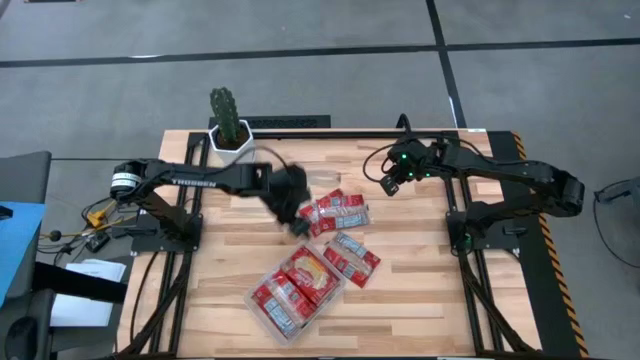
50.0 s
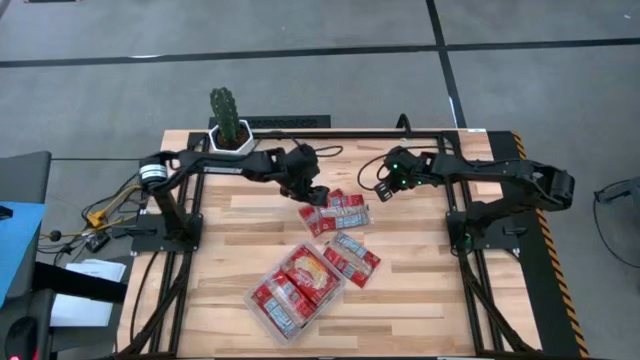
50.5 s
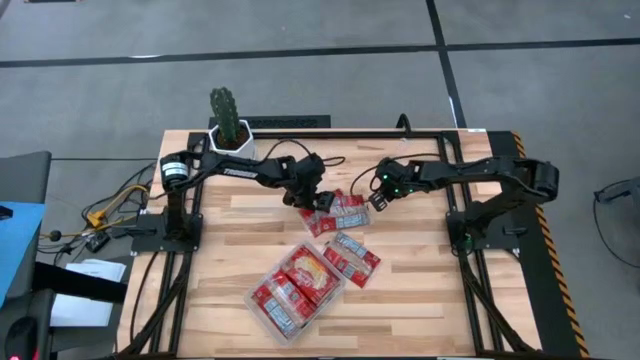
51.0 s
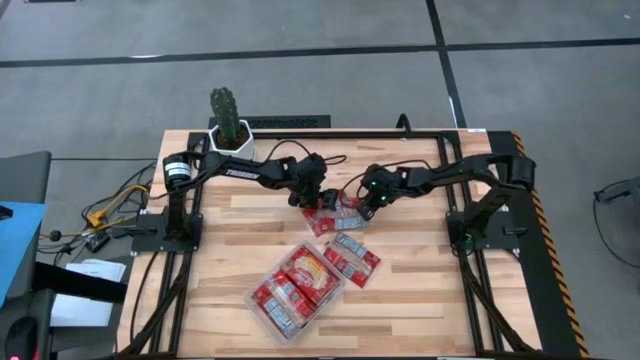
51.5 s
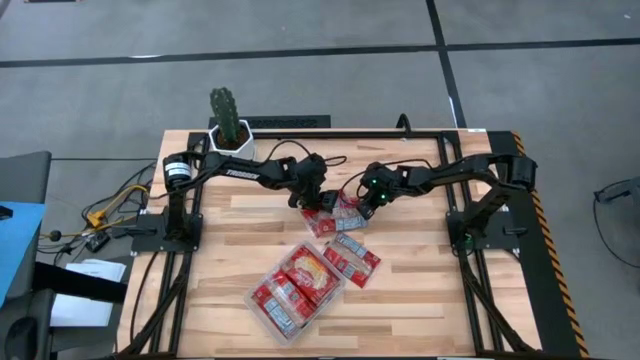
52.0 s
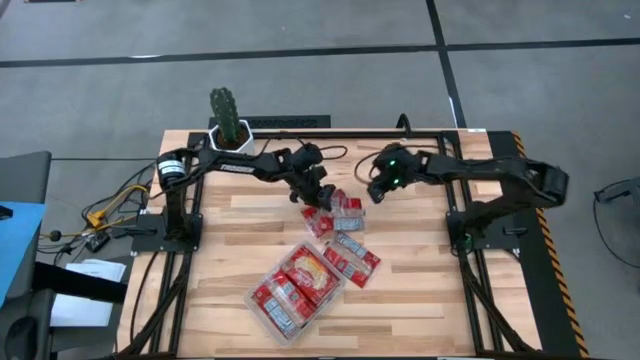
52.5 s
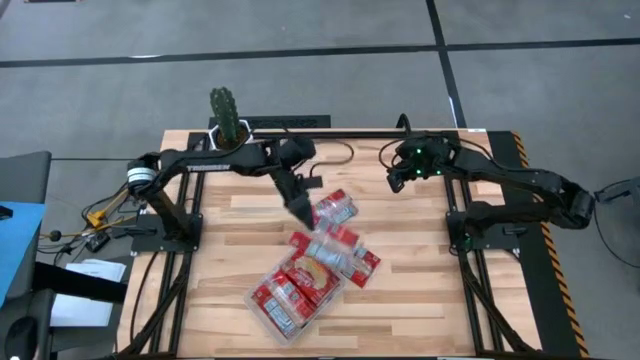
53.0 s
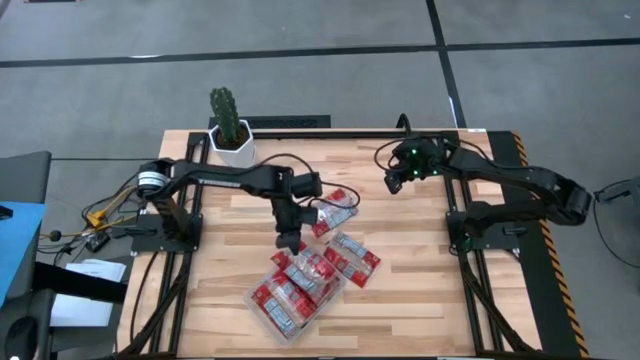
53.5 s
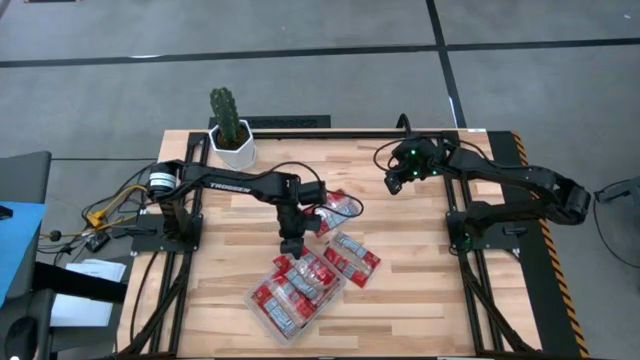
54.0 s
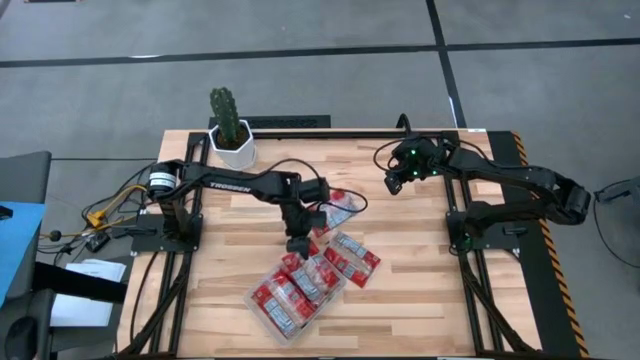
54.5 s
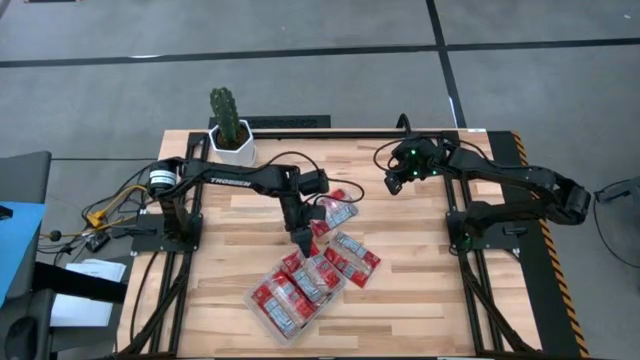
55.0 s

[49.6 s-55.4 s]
Task: Sort popcorn bags into baskets
Put the red popcorn bag into the transparent bin

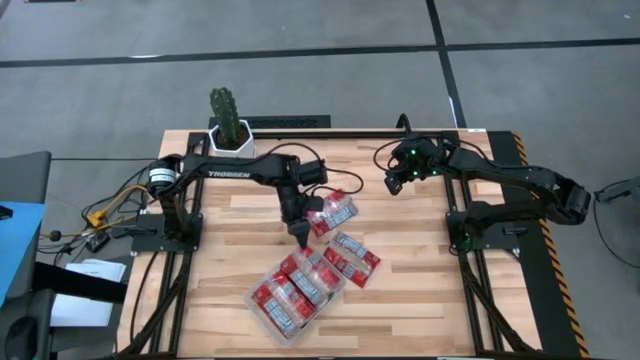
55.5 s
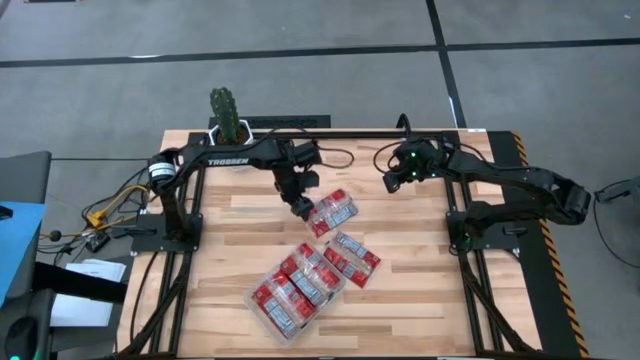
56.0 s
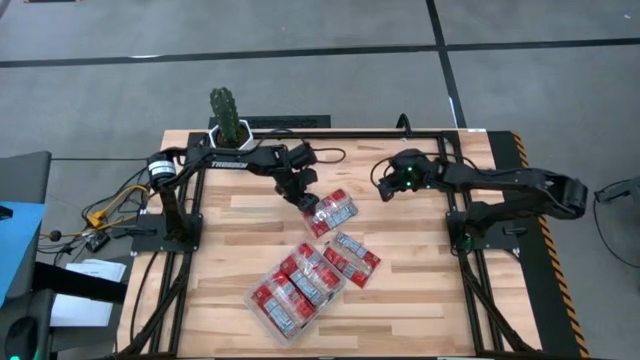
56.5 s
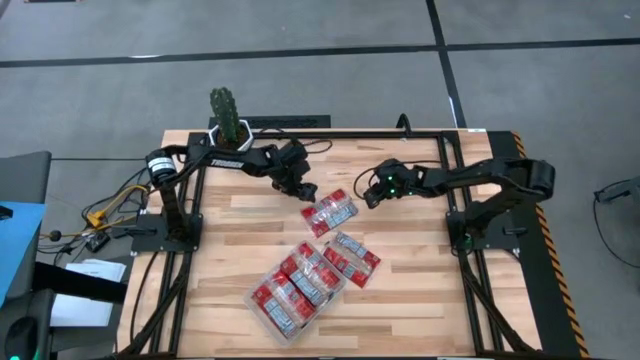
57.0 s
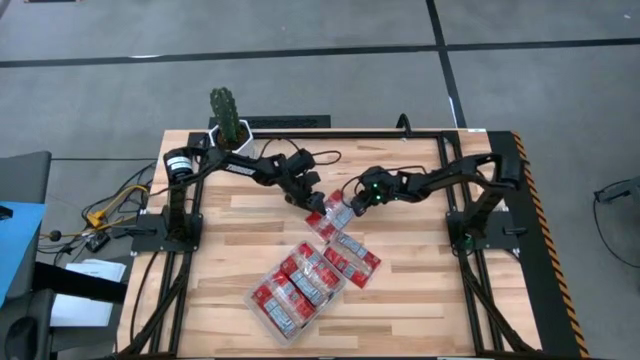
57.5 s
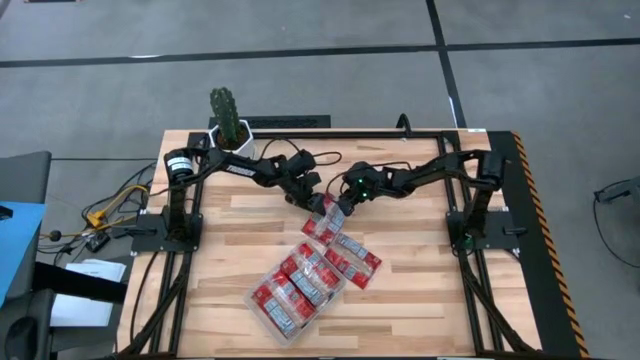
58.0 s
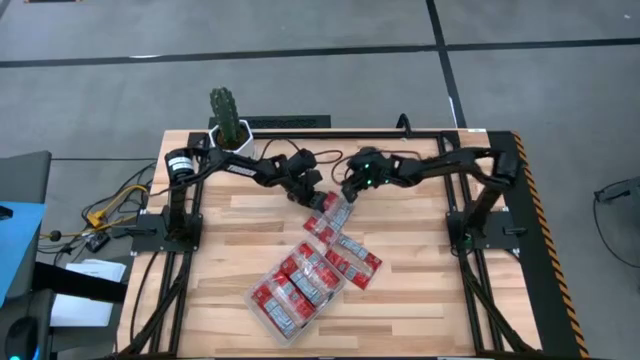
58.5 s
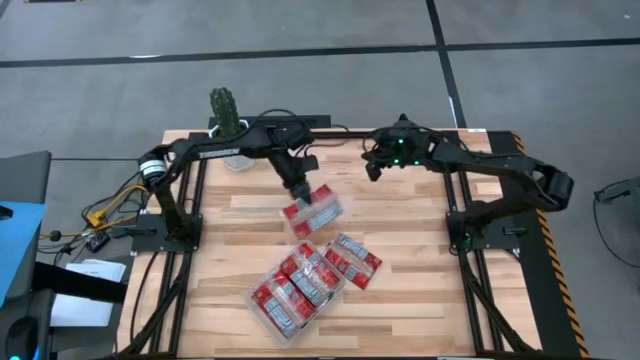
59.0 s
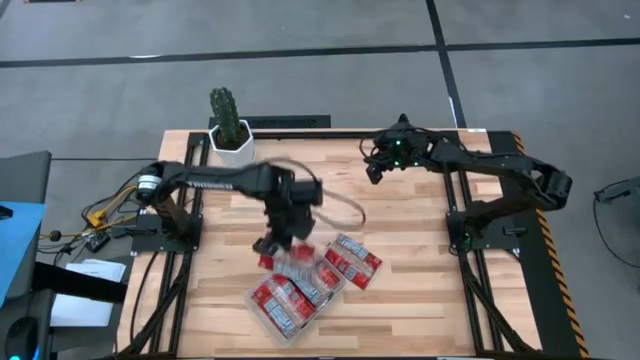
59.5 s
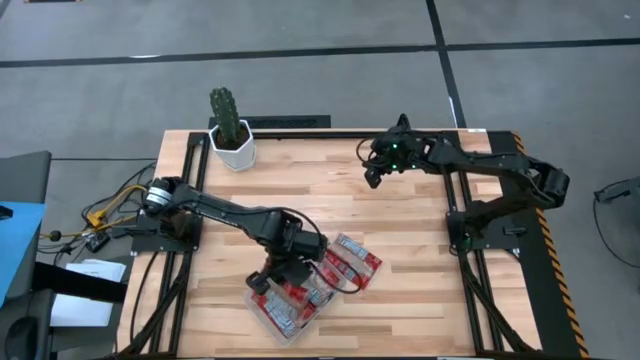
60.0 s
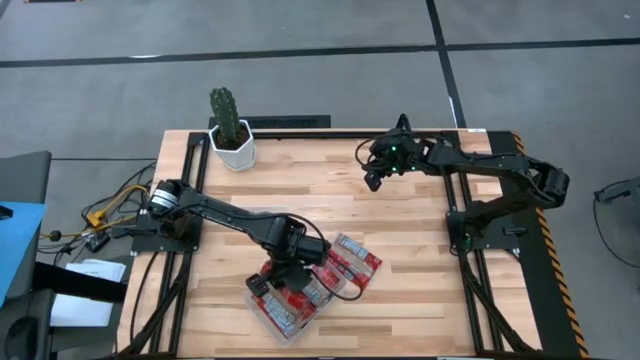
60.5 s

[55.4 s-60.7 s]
Put the red popcorn bag into the transparent bin

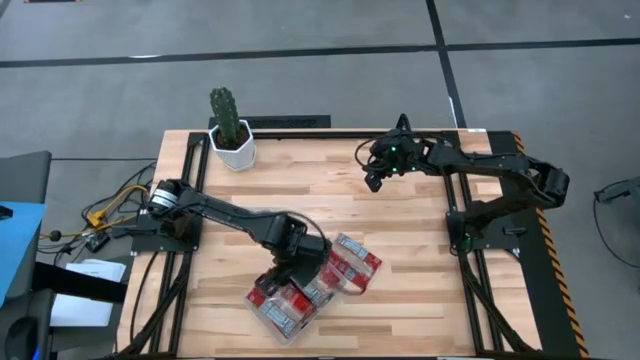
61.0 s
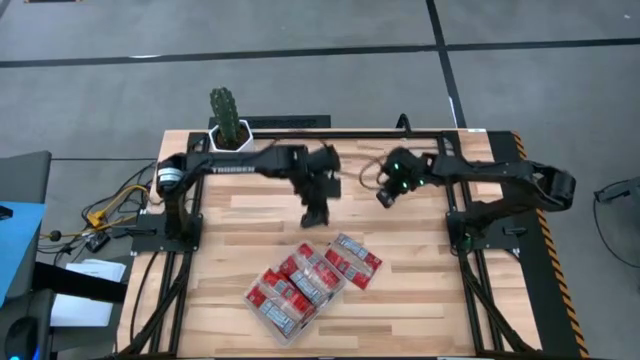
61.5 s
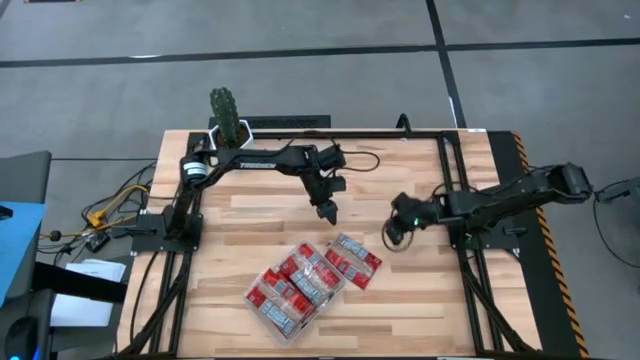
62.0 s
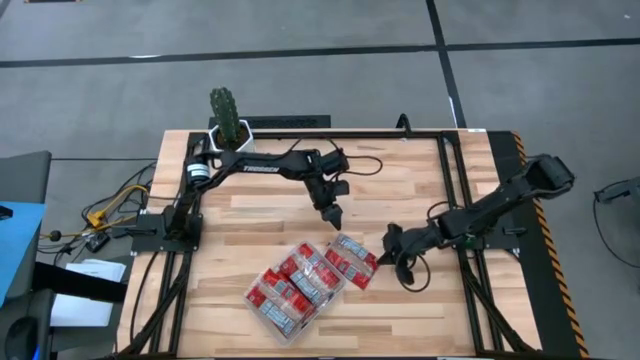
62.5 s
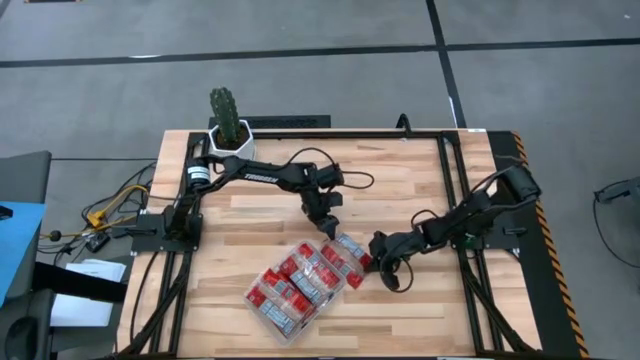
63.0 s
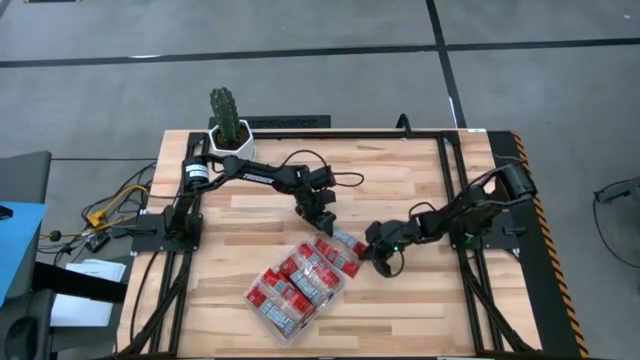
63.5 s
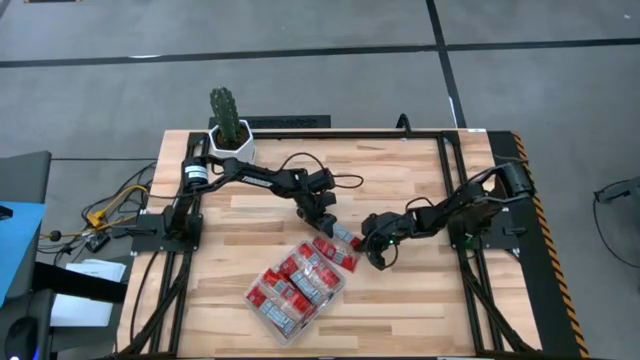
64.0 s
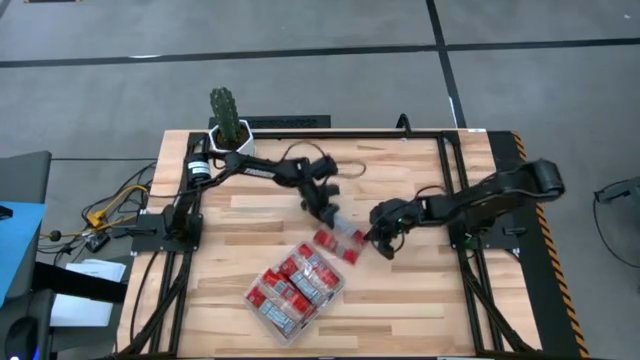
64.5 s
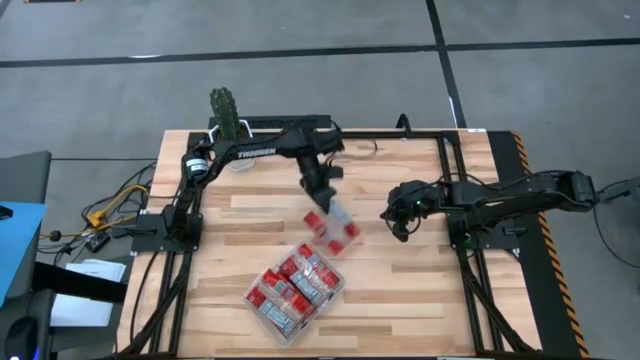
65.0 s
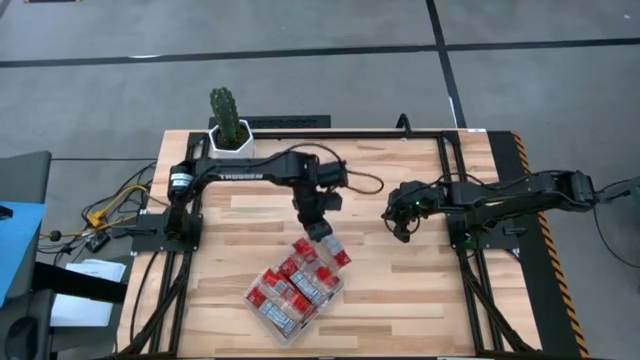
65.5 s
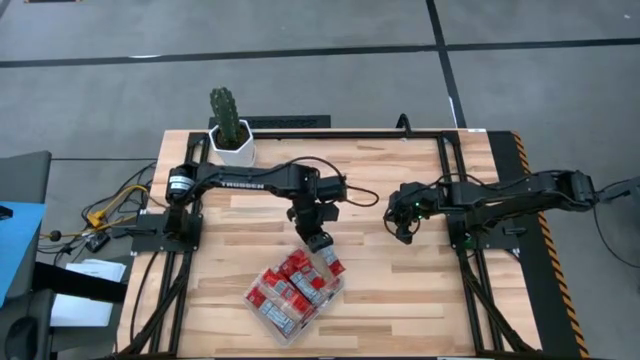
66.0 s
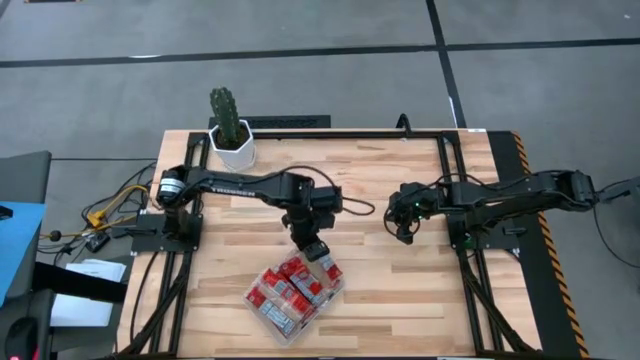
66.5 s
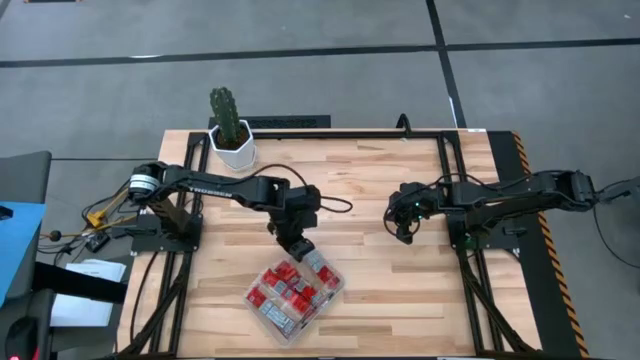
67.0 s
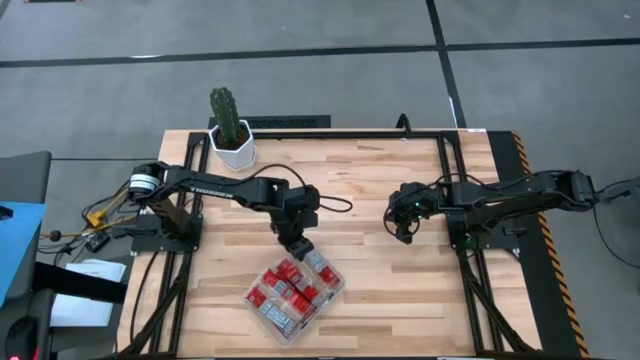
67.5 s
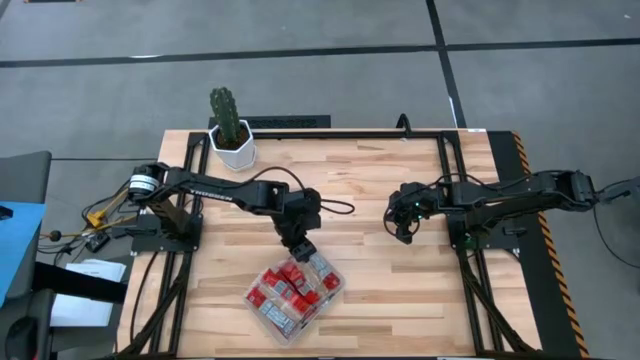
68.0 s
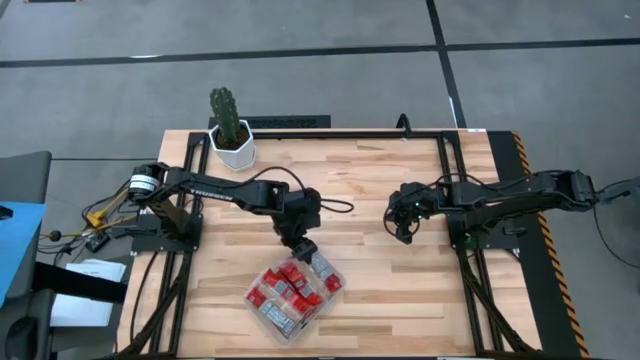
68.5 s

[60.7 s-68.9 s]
Put the red popcorn bag into the transparent bin

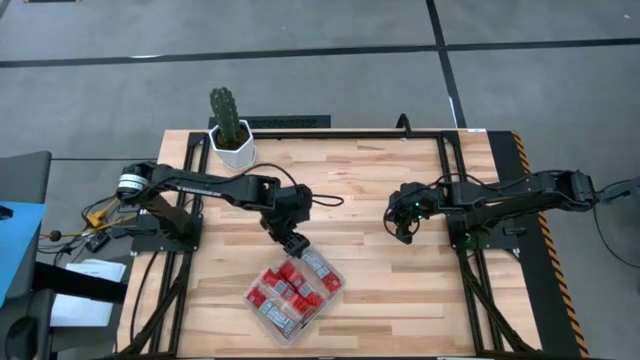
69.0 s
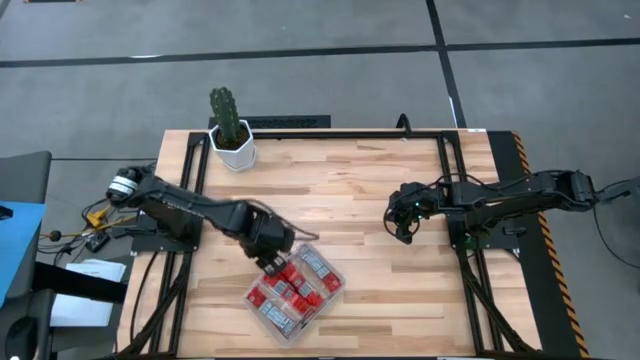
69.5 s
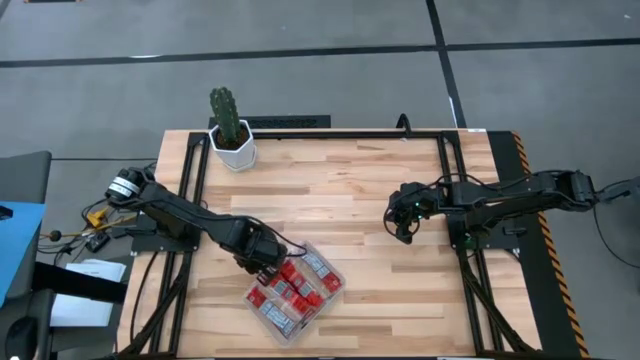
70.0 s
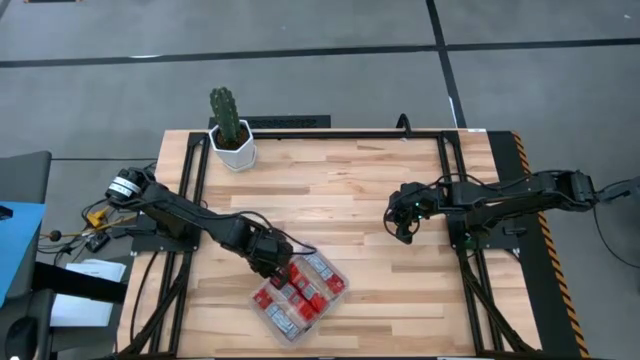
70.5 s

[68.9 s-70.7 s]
Adjust the red popcorn bag in the transparent bin

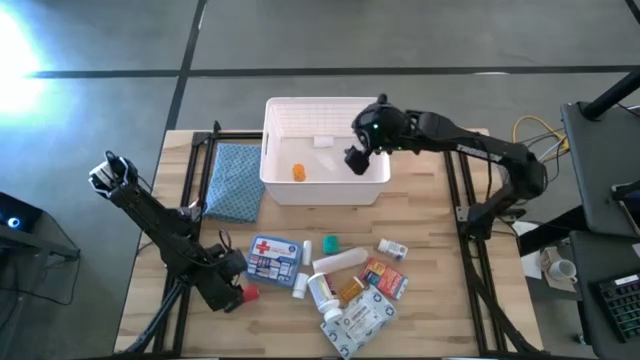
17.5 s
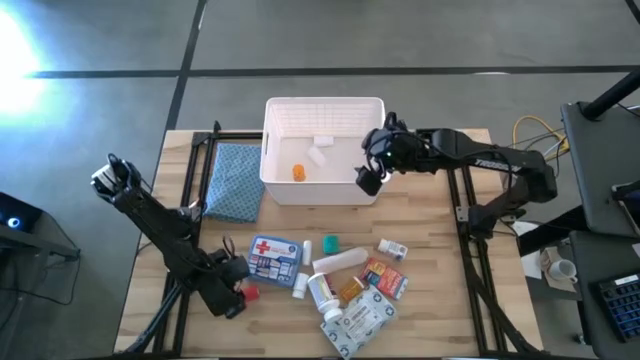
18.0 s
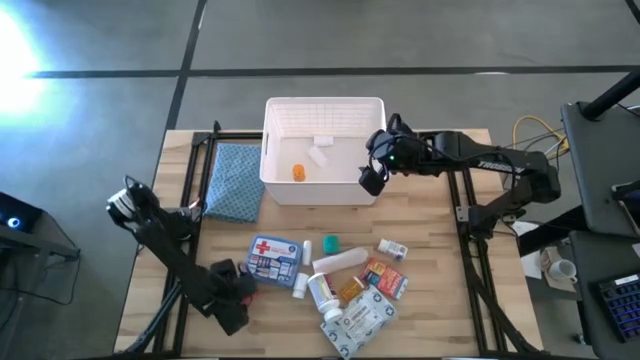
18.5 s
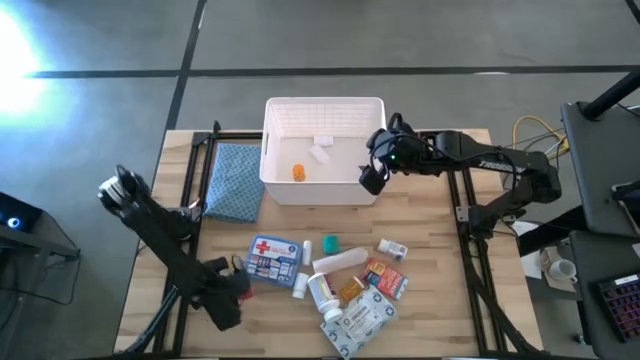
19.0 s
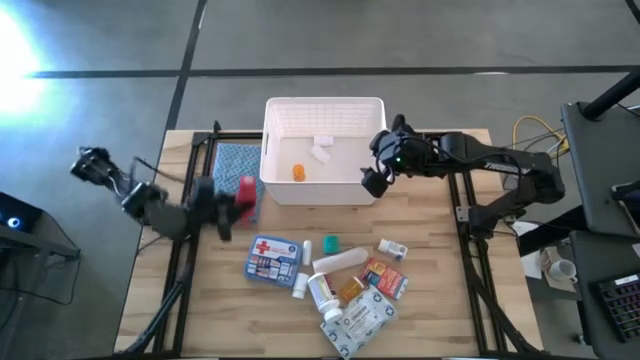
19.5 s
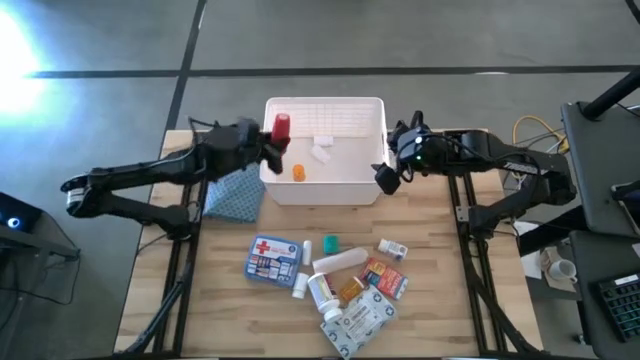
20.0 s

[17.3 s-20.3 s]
Task: Pick & place medical supplies in basket/bin
Put the red bandage into the white bin
